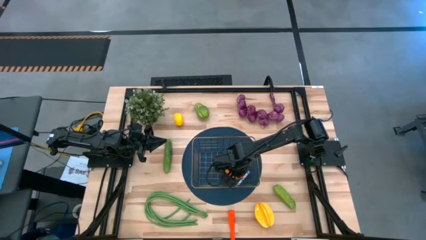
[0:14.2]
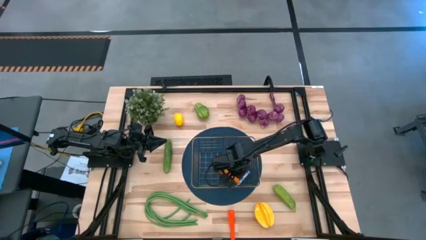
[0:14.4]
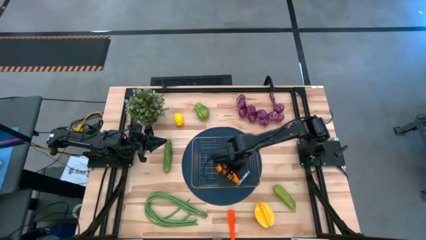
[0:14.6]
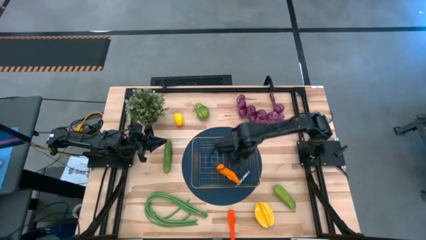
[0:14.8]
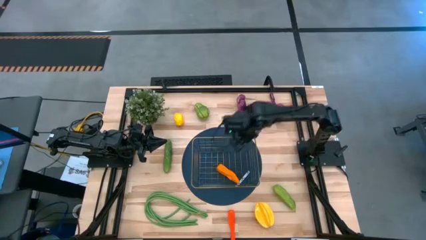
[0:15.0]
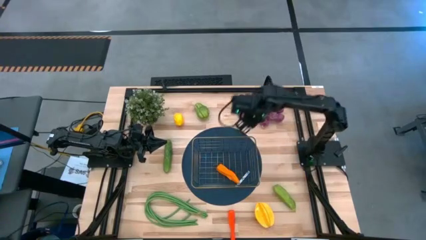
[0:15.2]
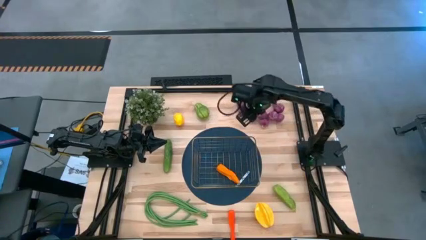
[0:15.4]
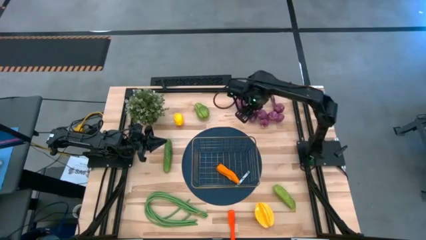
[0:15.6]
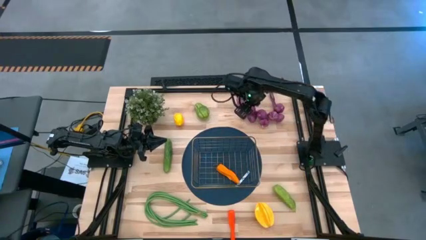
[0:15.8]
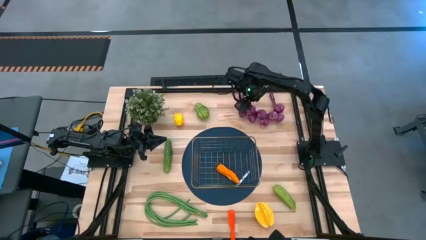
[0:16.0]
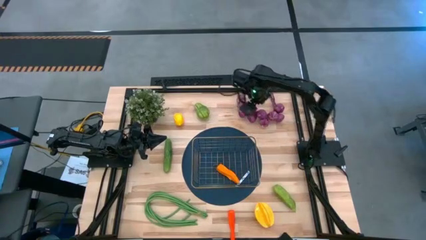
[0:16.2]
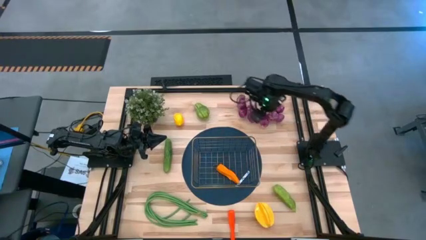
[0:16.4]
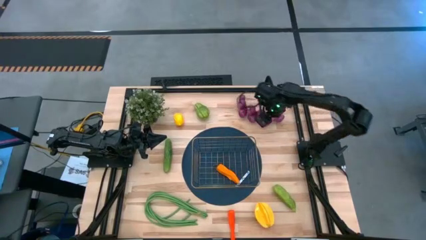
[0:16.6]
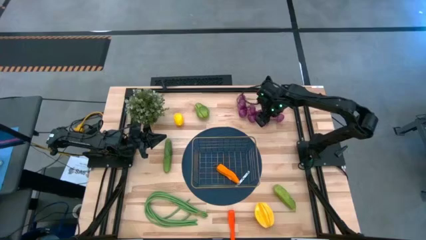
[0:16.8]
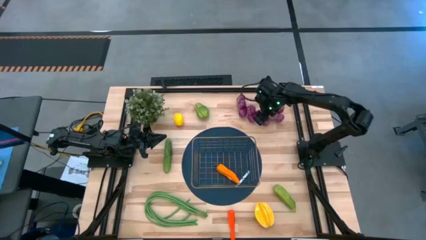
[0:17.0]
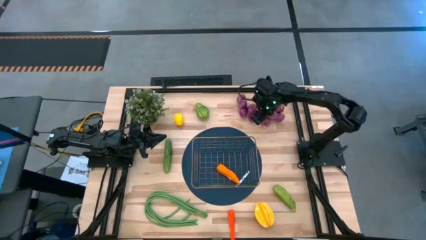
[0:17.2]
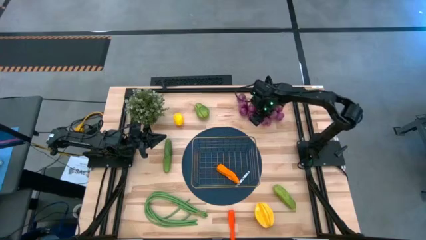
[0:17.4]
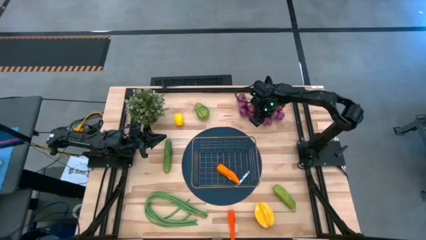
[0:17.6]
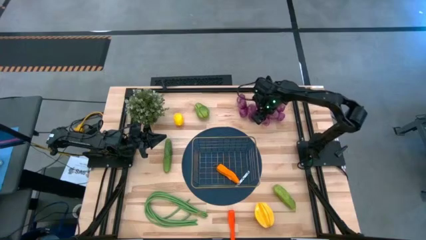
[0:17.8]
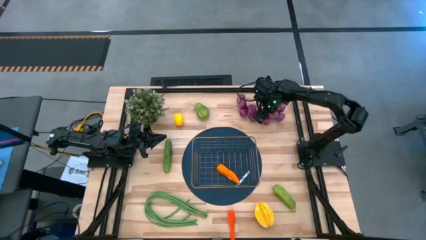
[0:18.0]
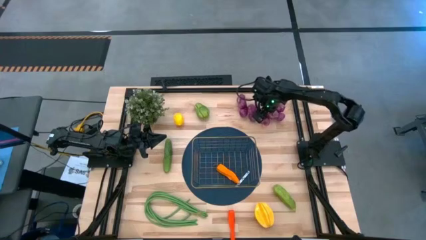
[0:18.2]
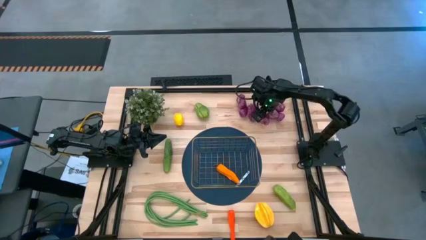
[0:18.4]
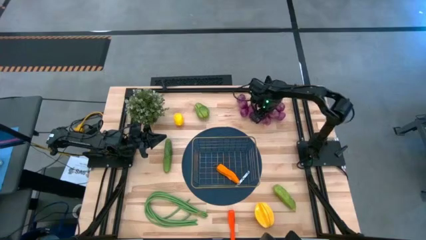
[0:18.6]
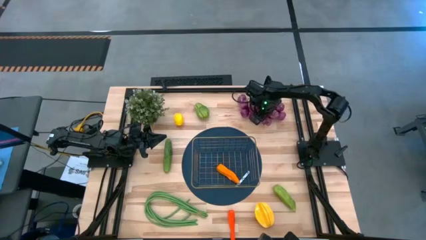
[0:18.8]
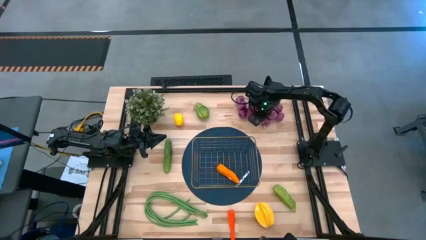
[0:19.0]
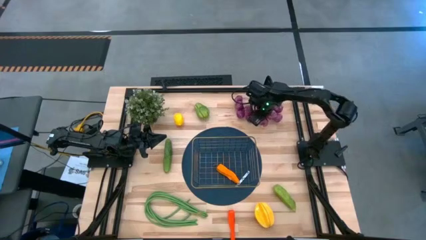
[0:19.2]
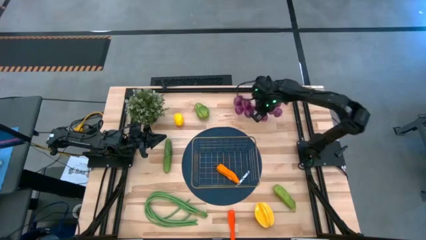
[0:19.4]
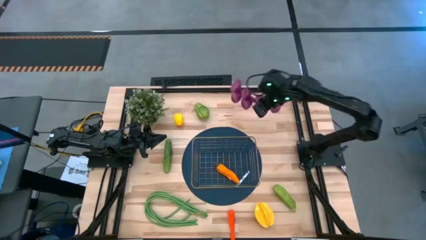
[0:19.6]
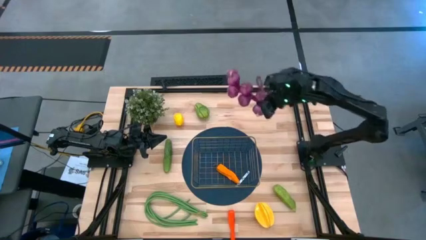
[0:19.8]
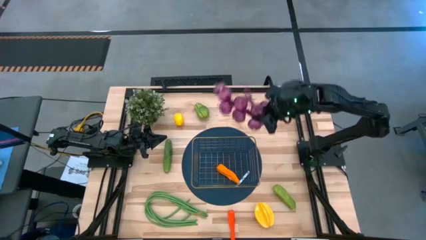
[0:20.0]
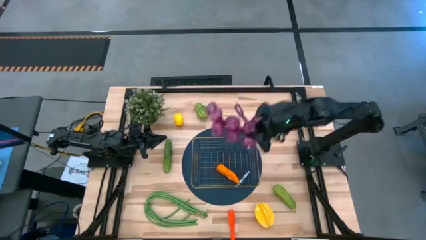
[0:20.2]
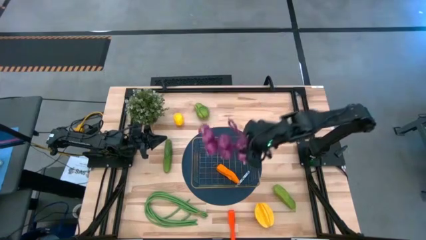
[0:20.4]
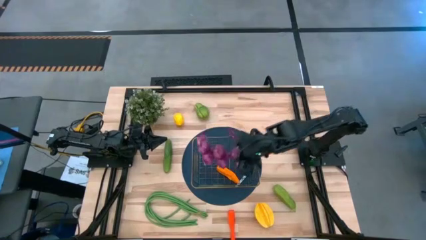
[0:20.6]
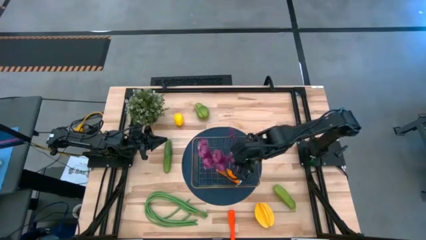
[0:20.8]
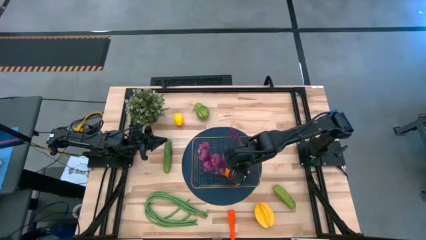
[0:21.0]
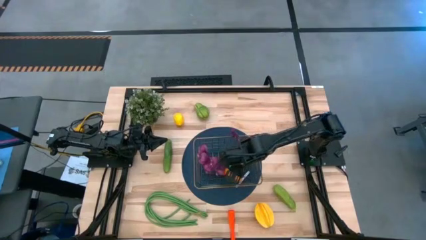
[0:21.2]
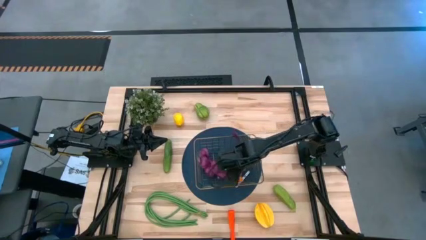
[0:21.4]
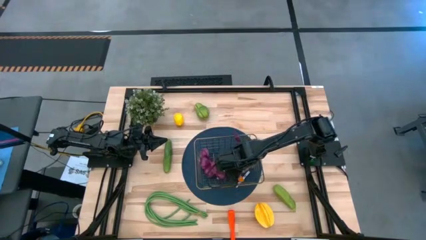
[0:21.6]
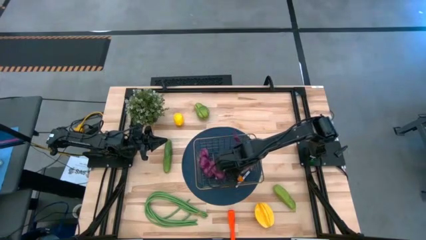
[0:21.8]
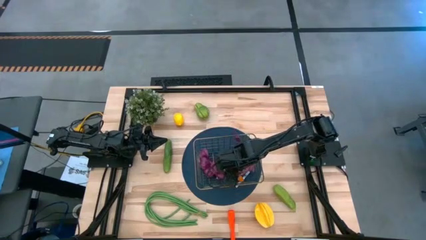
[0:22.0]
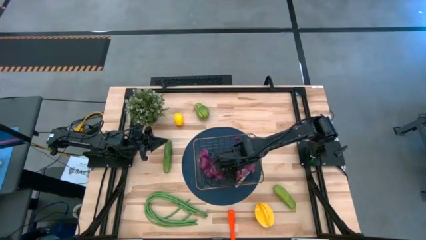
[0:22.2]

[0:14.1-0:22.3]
Task: Build produce basket
Put the purple garlic into the gold wire basket

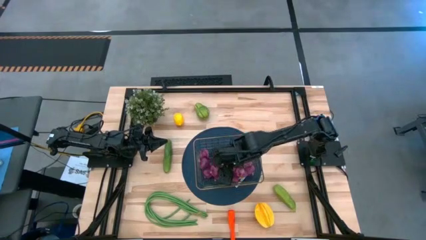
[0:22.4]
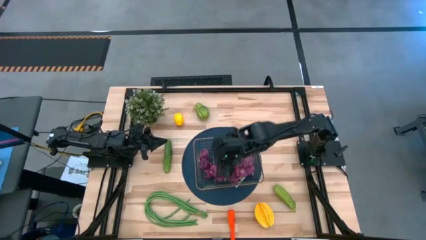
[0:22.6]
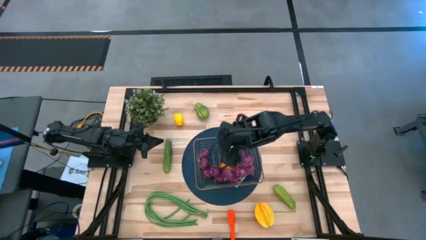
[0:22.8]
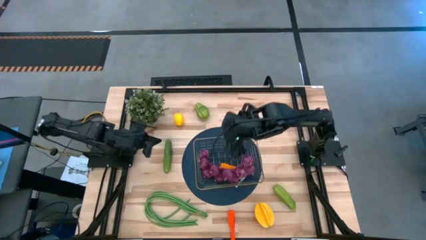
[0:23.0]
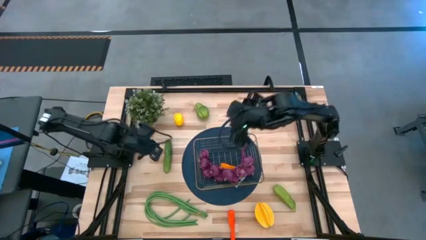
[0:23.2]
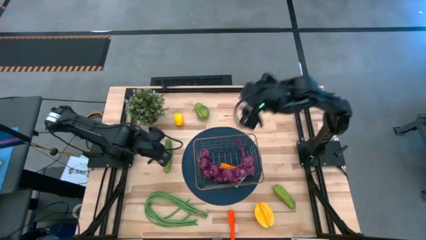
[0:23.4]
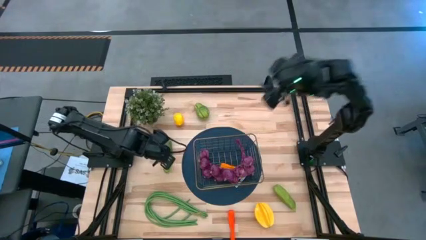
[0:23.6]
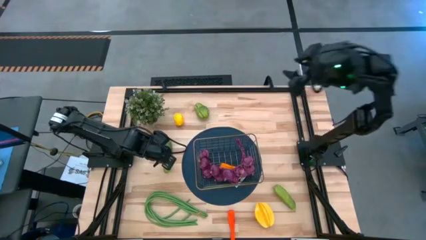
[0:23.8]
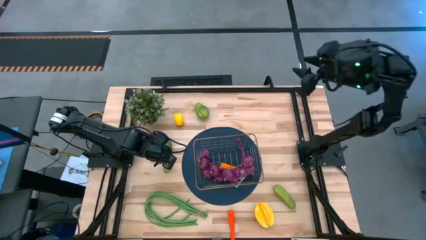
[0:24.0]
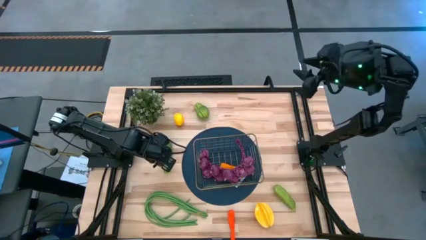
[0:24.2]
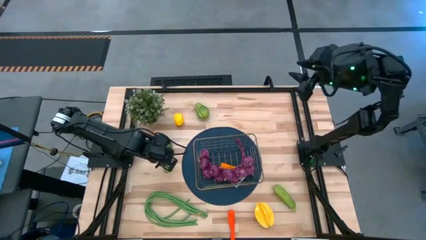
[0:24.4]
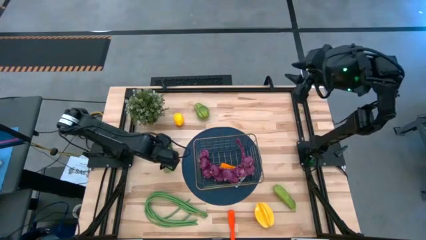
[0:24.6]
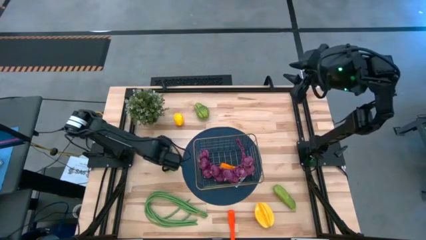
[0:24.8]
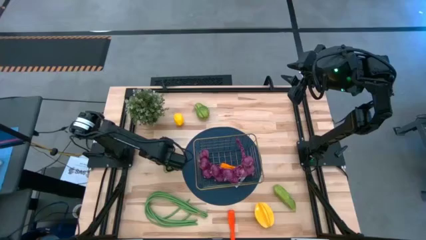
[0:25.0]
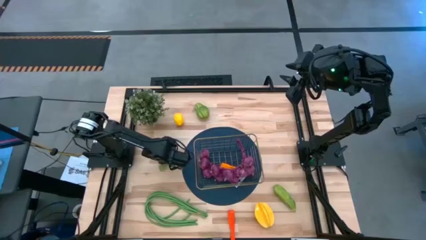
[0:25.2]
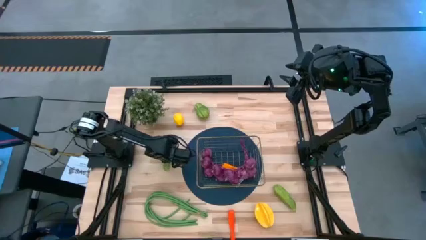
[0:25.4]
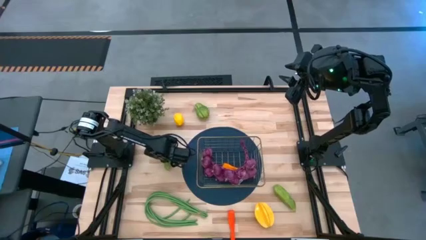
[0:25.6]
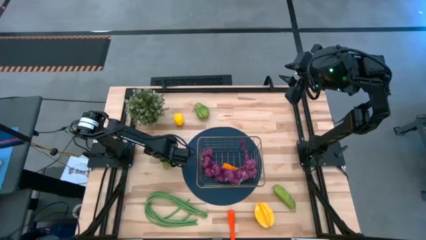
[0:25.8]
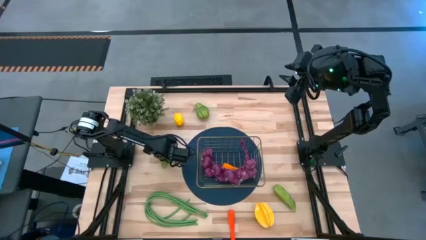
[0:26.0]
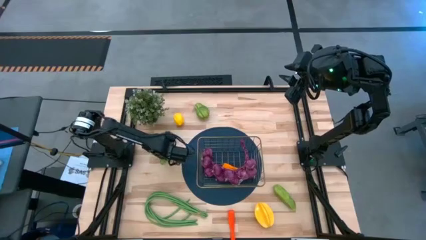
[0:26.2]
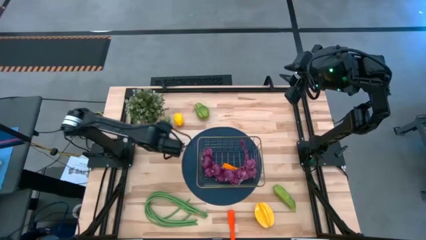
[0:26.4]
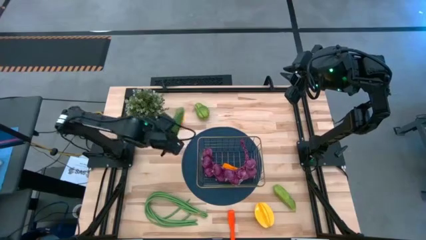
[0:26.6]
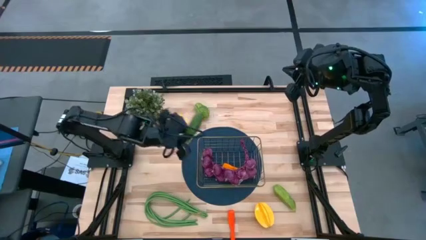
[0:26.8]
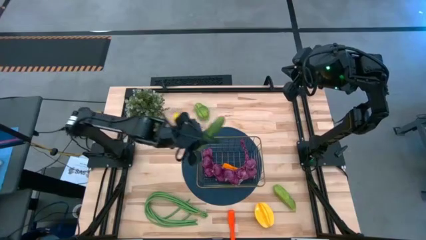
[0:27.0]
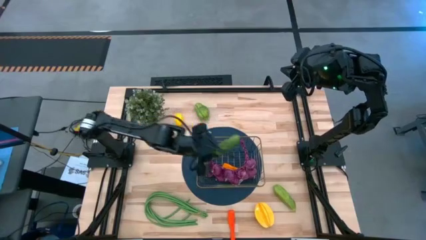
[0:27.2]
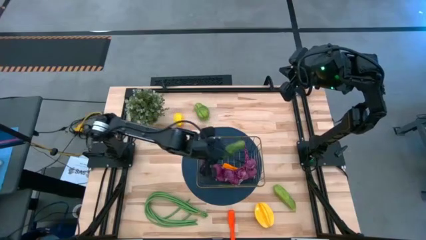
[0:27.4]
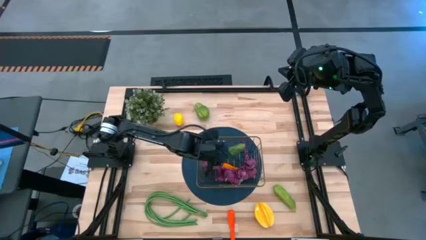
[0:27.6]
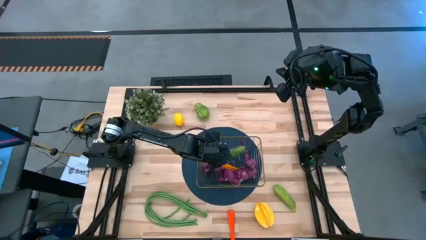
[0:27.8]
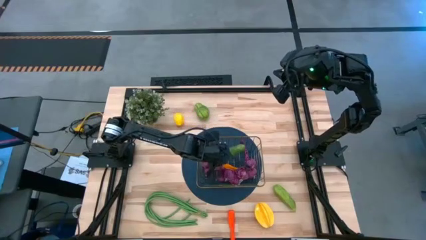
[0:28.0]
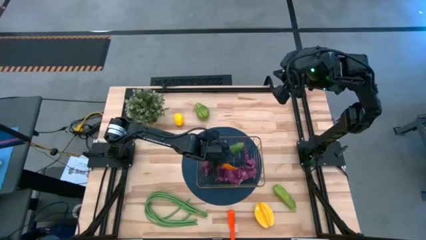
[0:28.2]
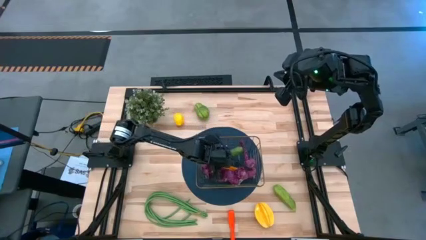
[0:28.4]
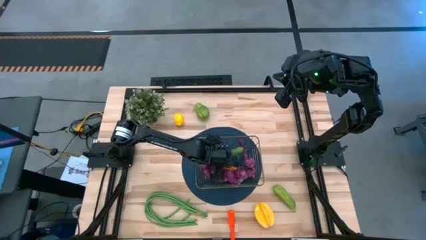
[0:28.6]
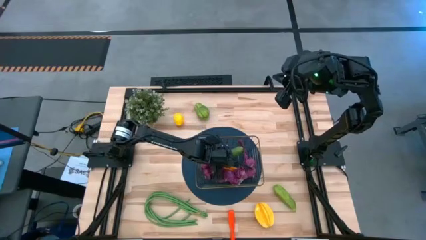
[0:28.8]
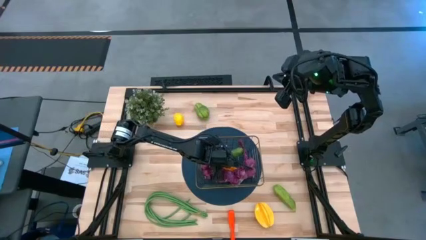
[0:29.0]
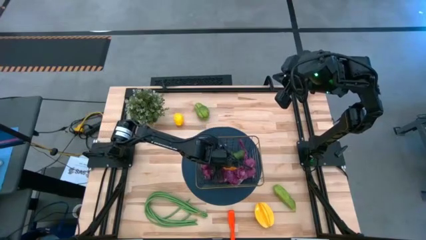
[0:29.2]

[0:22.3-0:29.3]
Put the top green cucumber into the gold wire basket
